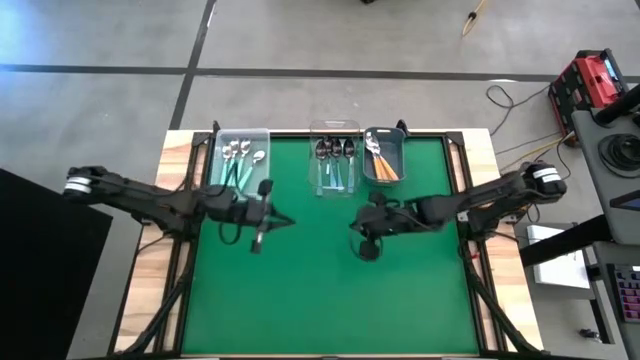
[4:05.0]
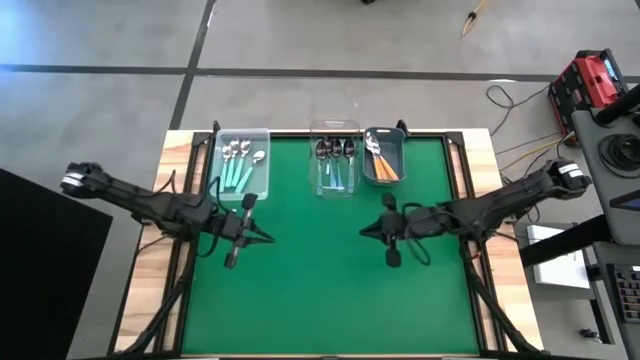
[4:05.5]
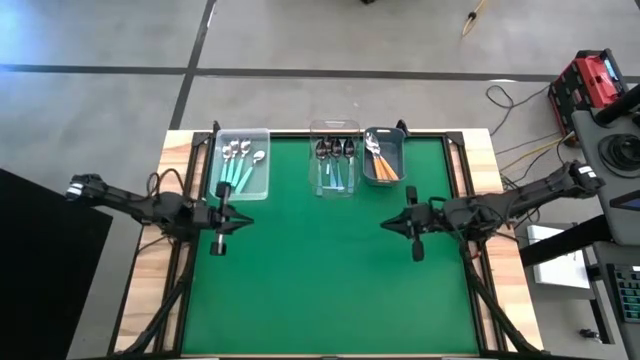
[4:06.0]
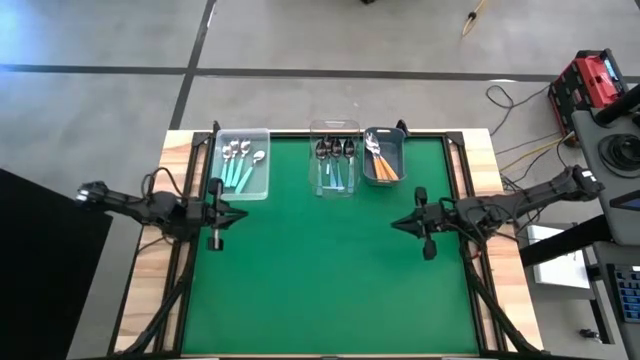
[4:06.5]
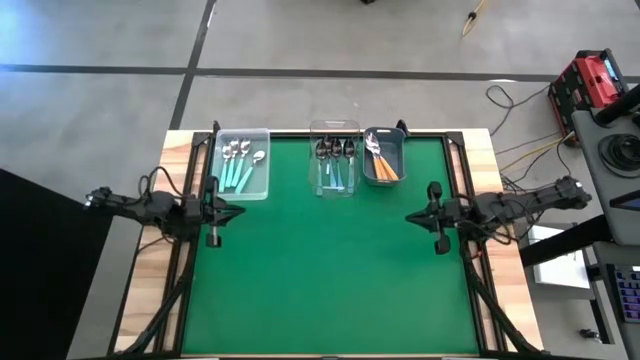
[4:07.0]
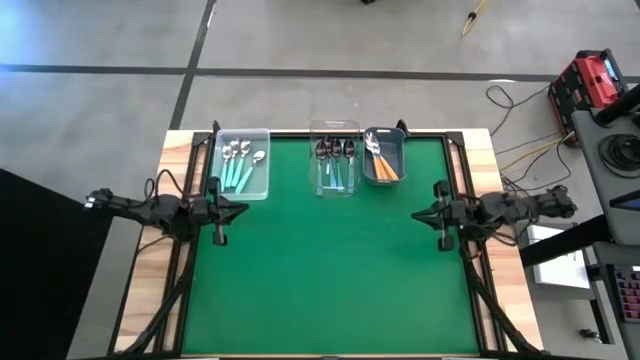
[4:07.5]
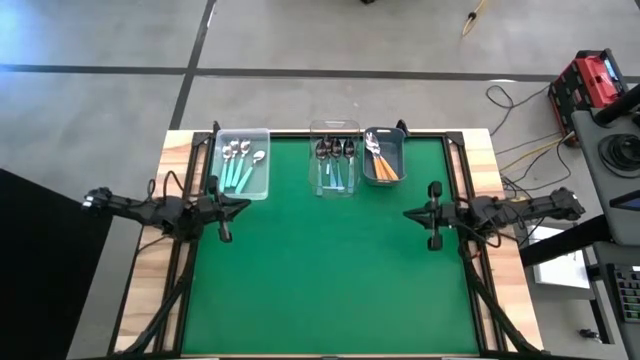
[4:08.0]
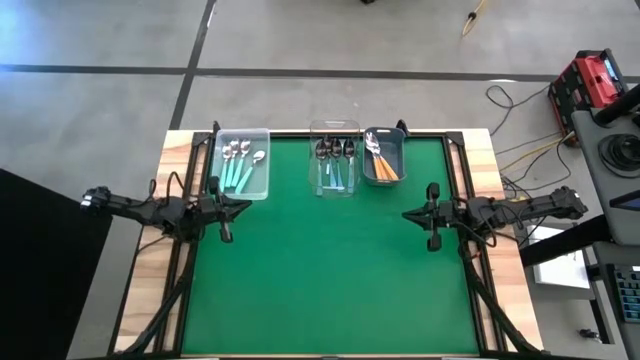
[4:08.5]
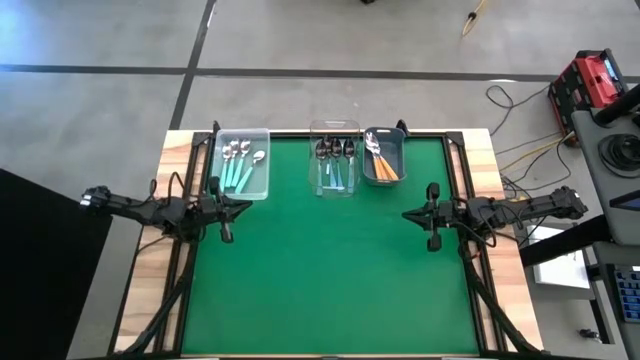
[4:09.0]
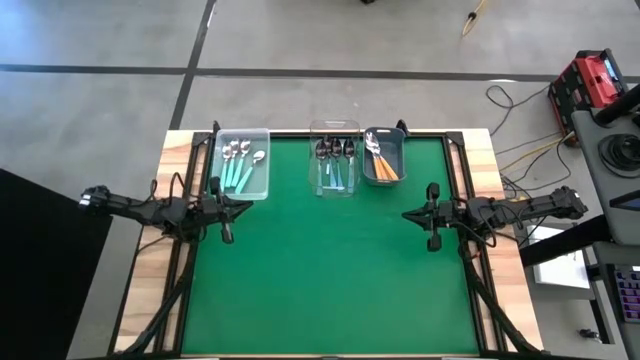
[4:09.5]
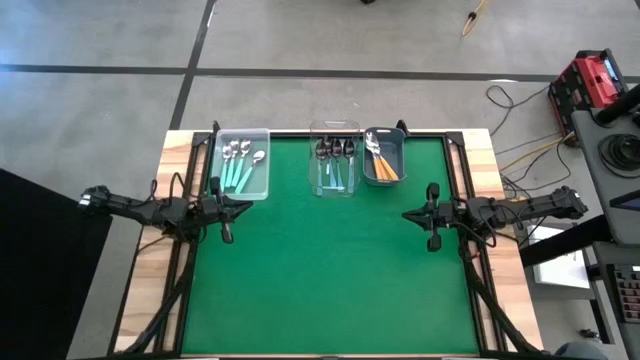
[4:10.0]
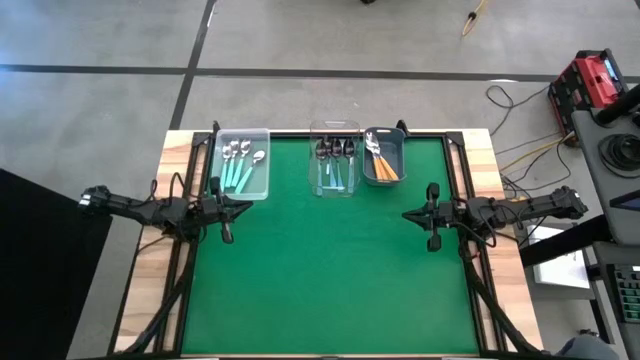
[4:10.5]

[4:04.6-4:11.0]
Task: Sort silverware by color (type)
Return to Home Position

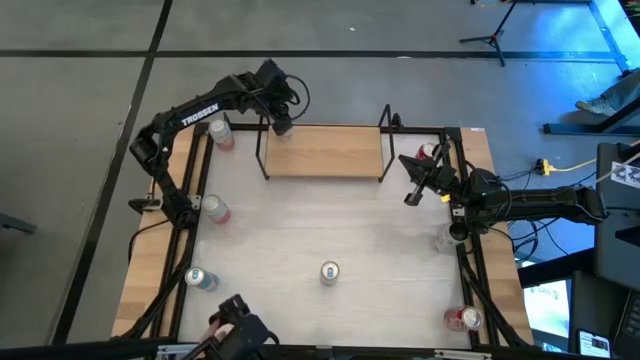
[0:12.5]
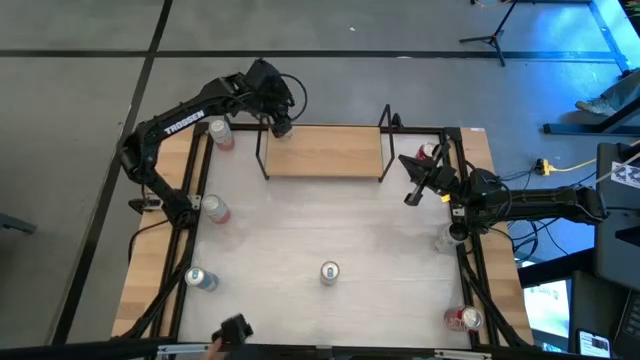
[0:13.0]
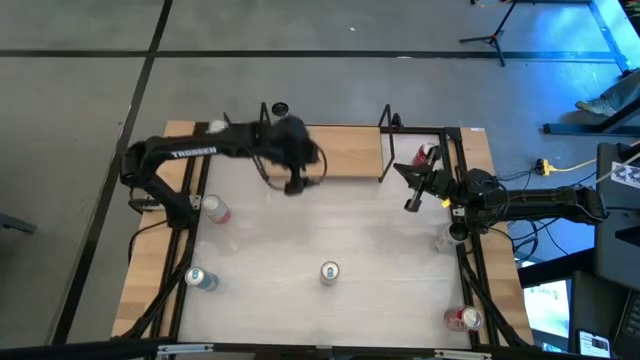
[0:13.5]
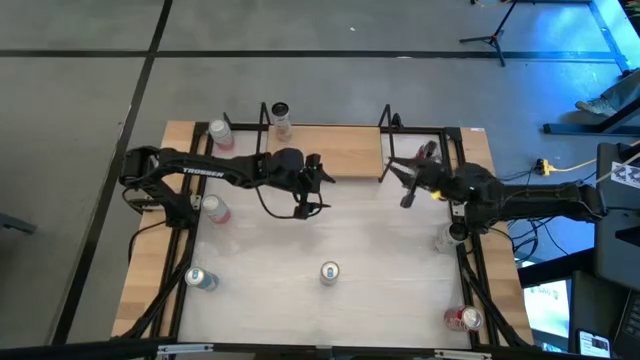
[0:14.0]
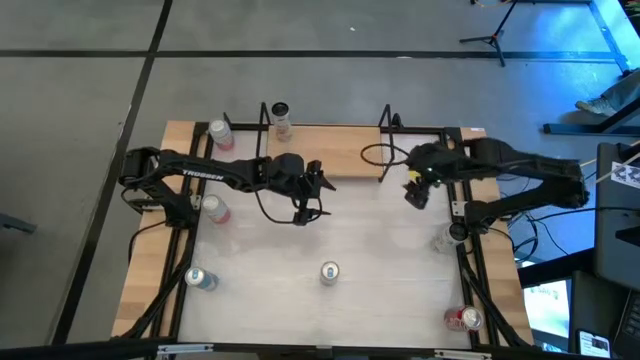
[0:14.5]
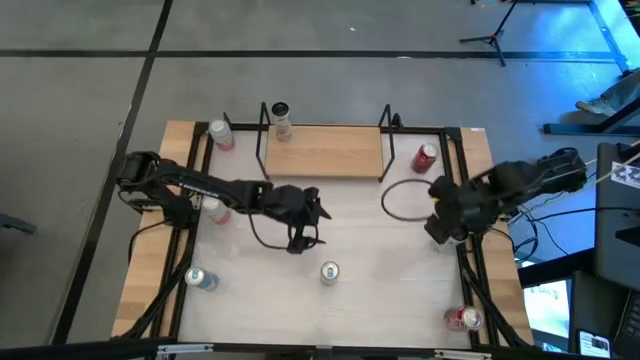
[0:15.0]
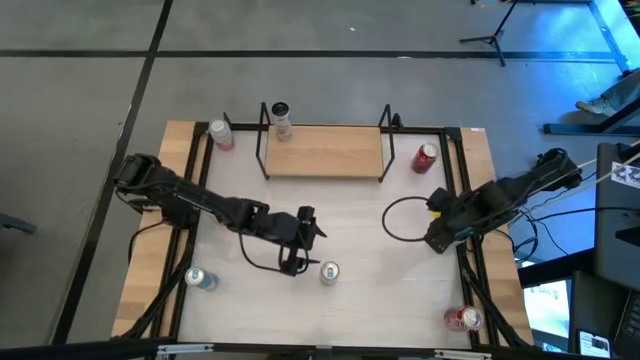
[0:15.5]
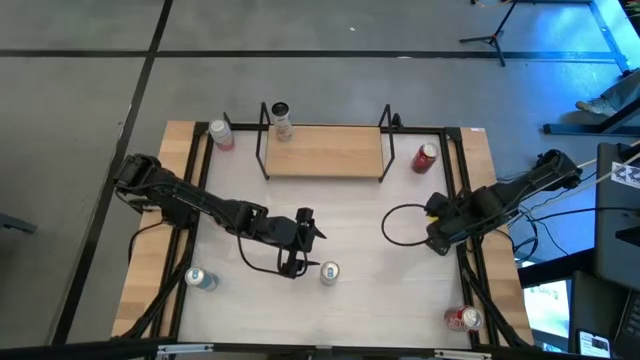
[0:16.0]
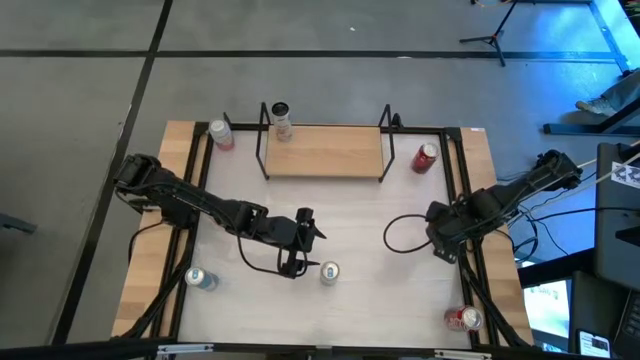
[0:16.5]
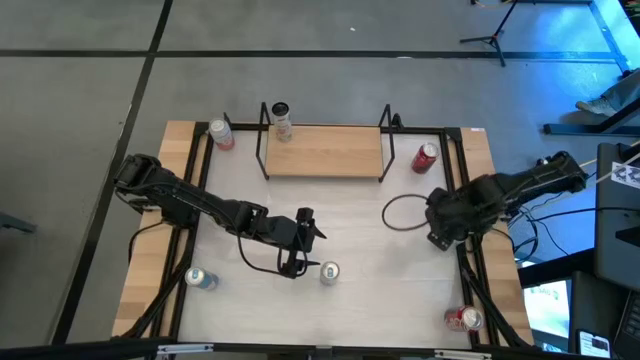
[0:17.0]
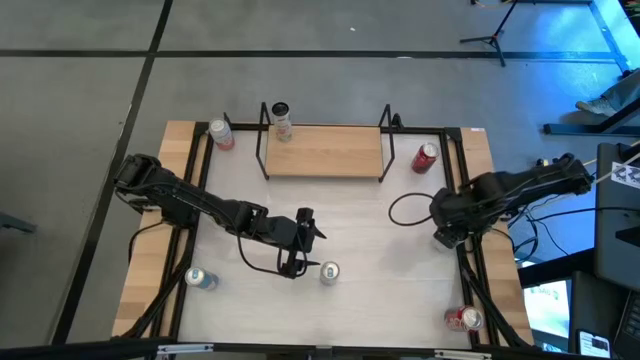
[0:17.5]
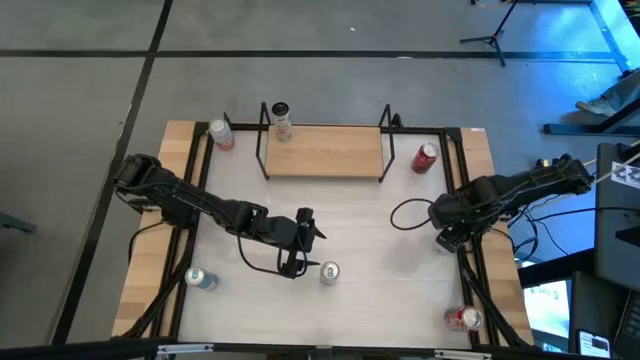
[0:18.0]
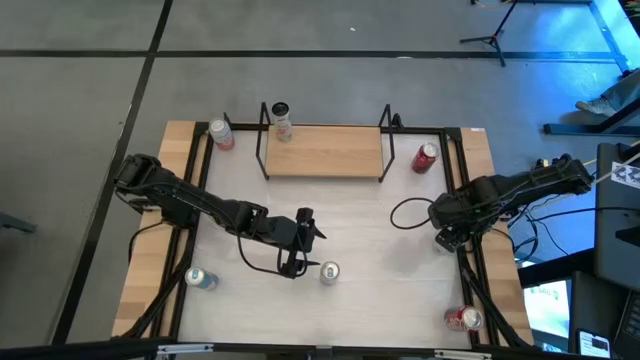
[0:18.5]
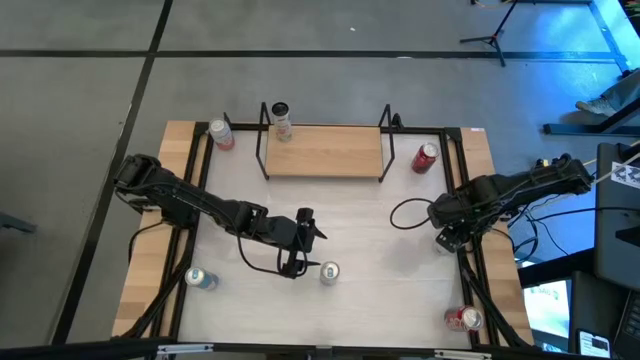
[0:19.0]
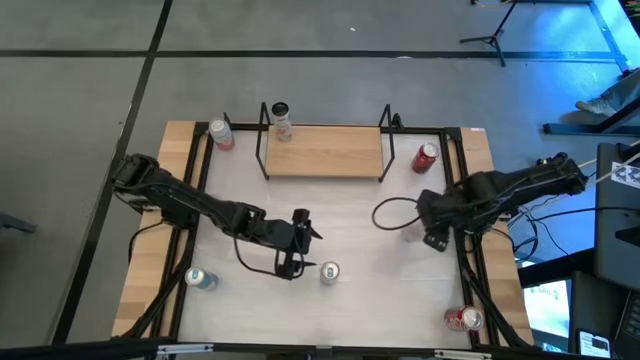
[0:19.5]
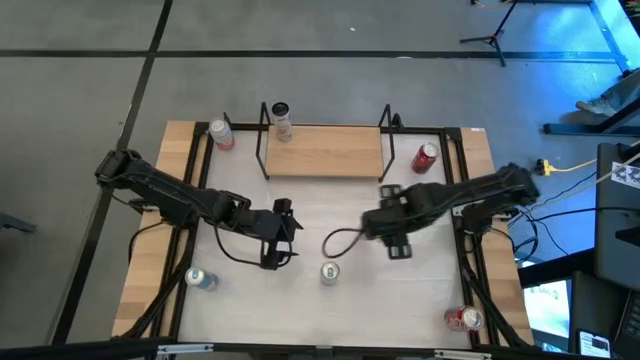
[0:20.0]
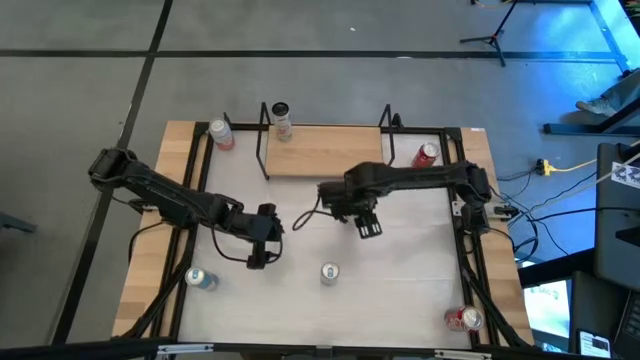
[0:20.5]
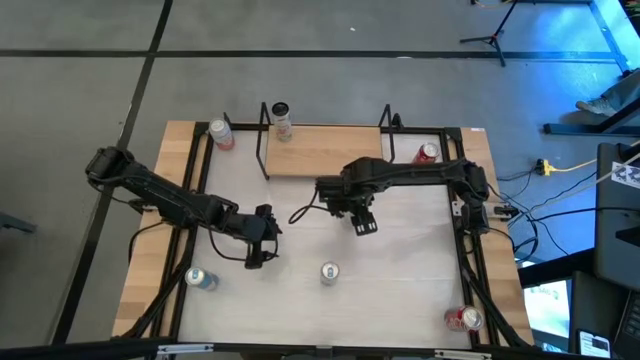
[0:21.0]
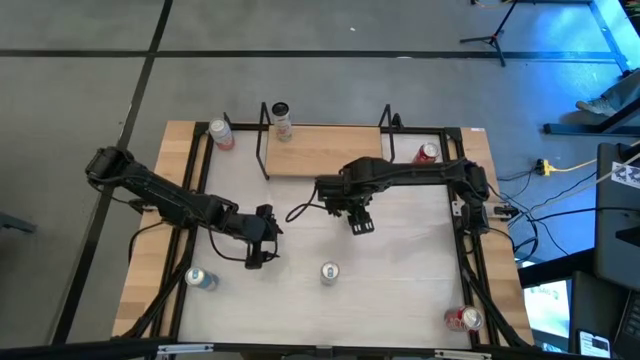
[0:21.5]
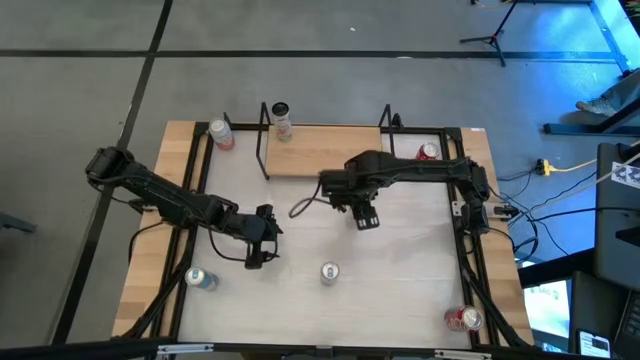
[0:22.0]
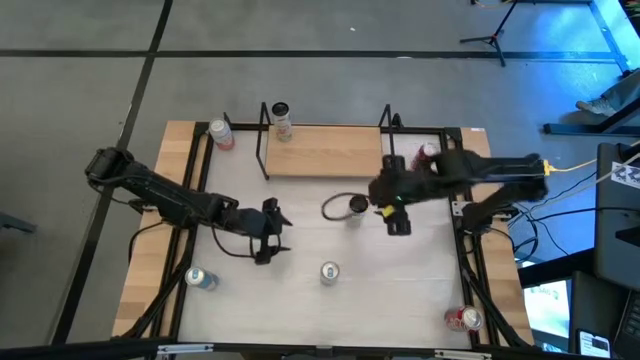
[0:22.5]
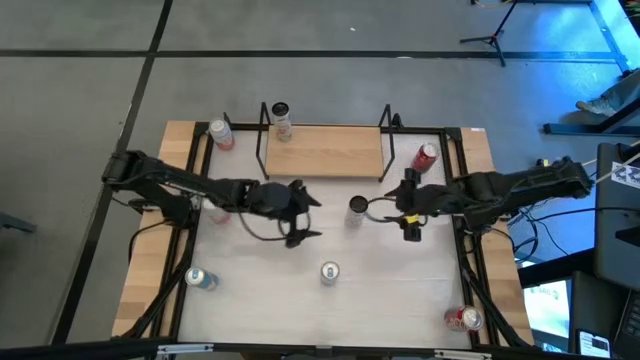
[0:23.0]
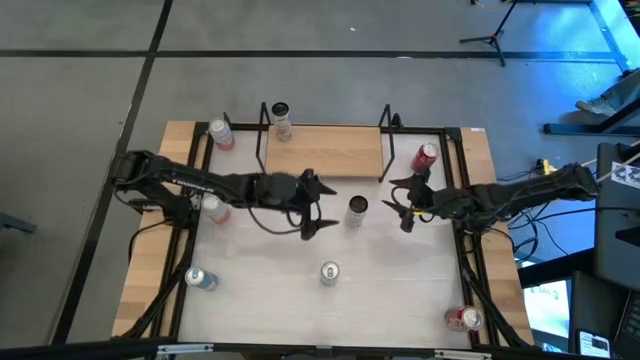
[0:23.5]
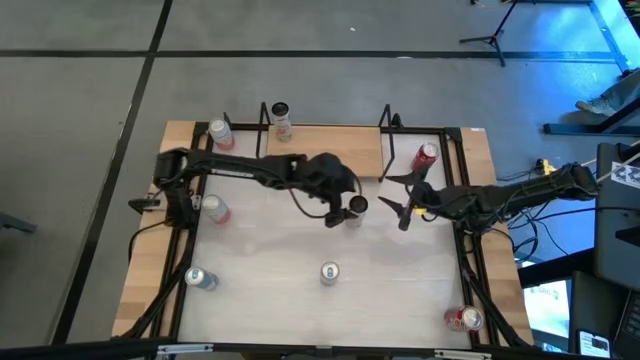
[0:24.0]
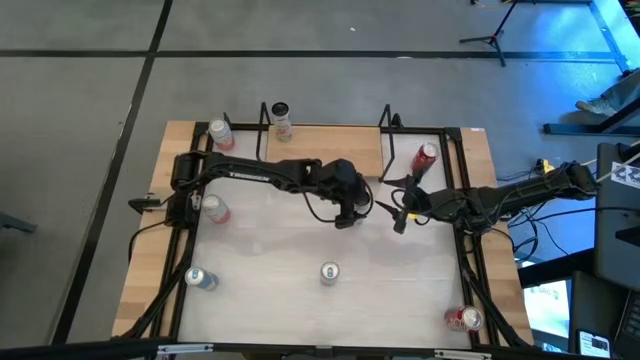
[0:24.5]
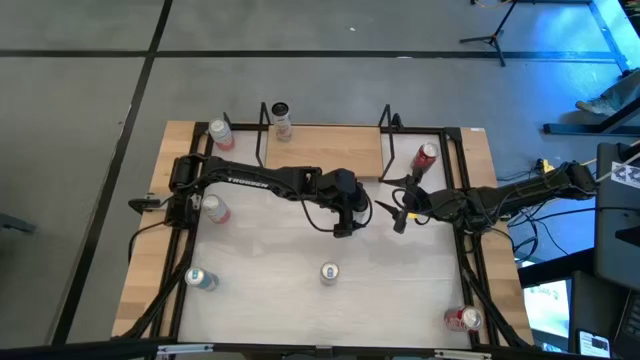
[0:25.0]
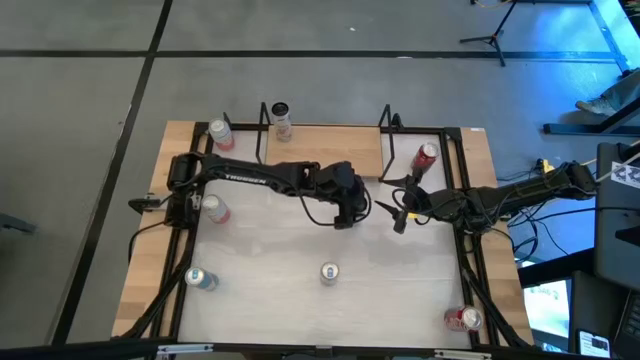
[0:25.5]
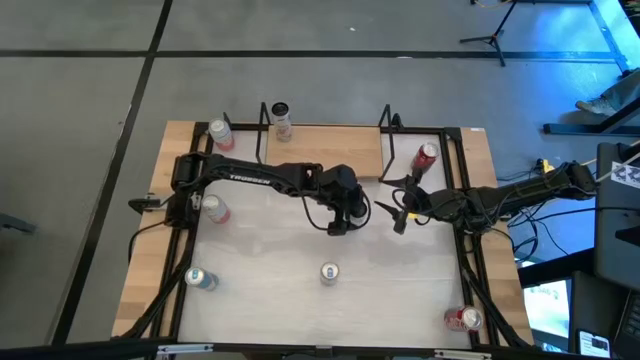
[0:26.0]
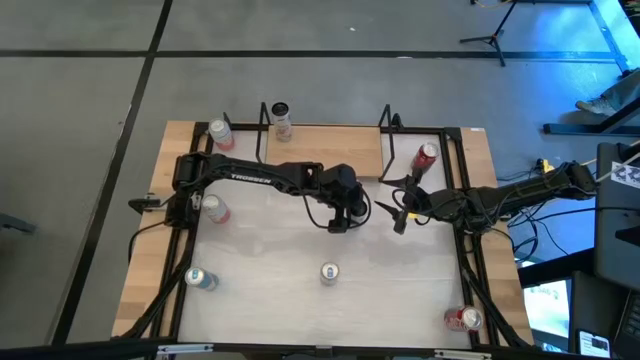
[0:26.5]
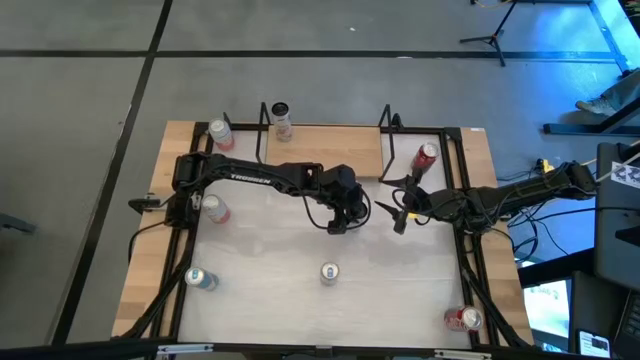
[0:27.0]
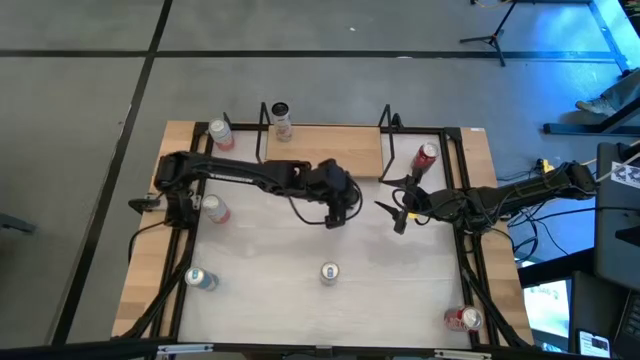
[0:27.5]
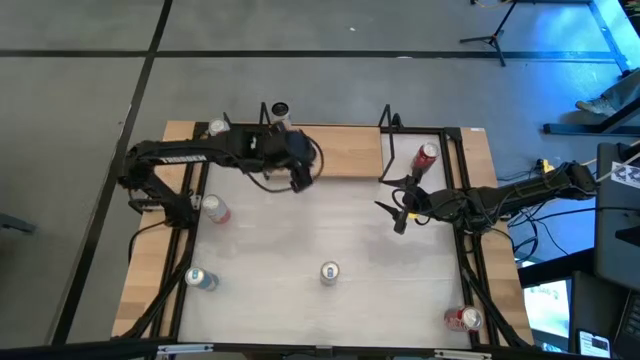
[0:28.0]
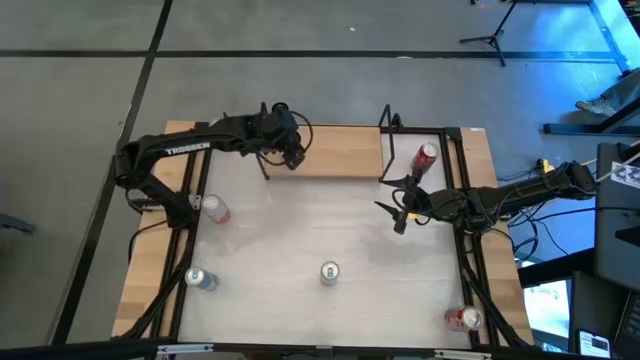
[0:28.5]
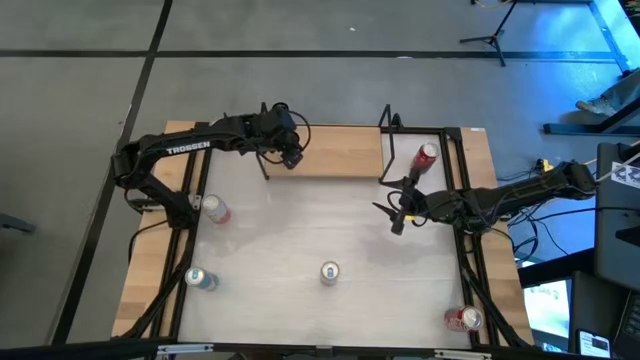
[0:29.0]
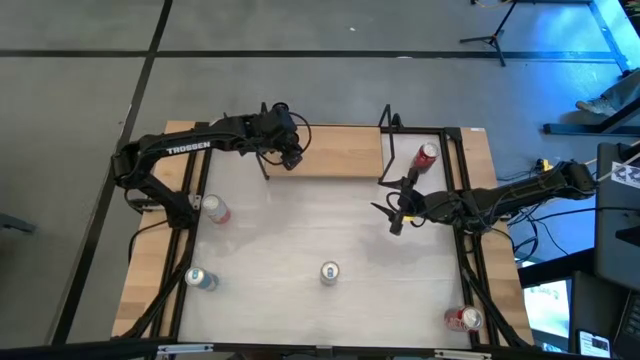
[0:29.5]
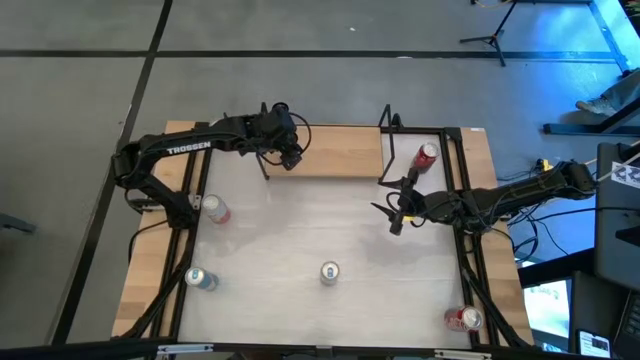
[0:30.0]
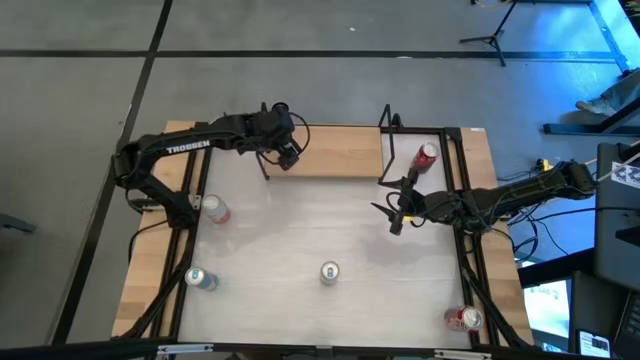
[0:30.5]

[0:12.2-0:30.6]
Task: Place canned beverage on shelf
Put the white-pink soda can on the shelf aligned with the other white-pink soda can
